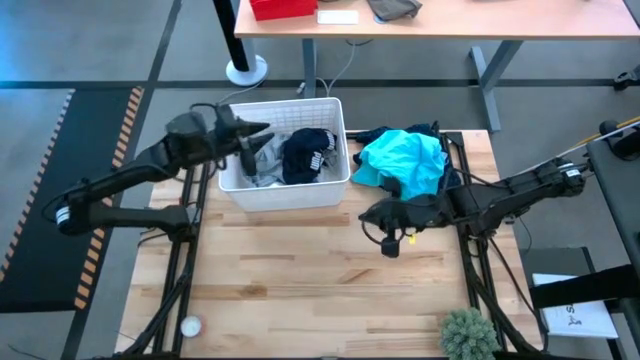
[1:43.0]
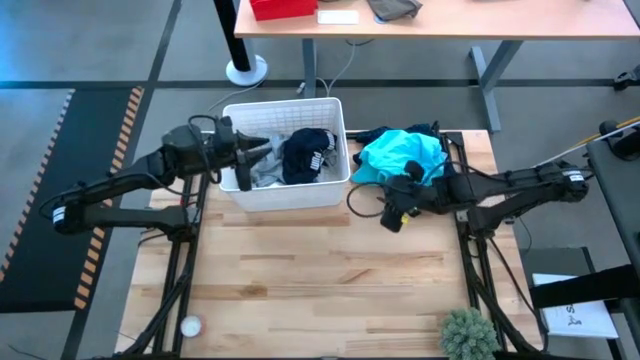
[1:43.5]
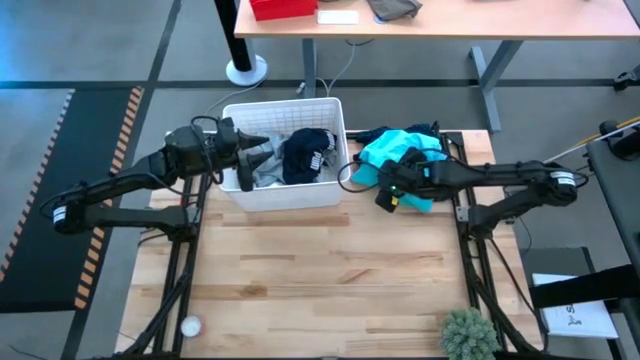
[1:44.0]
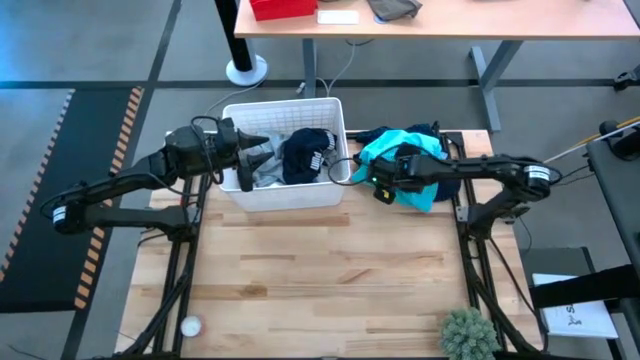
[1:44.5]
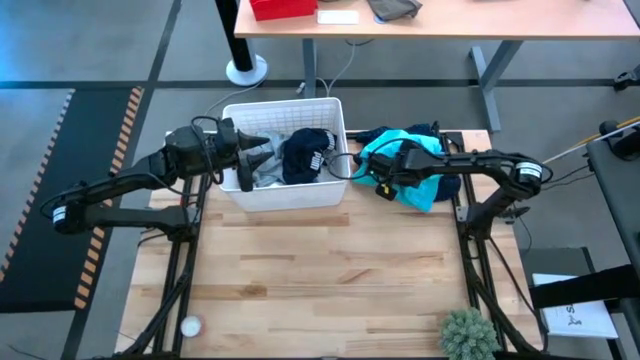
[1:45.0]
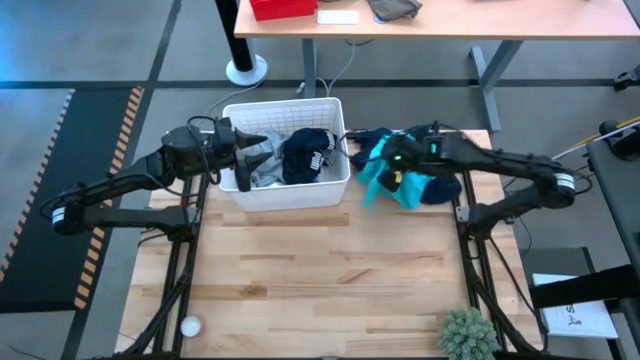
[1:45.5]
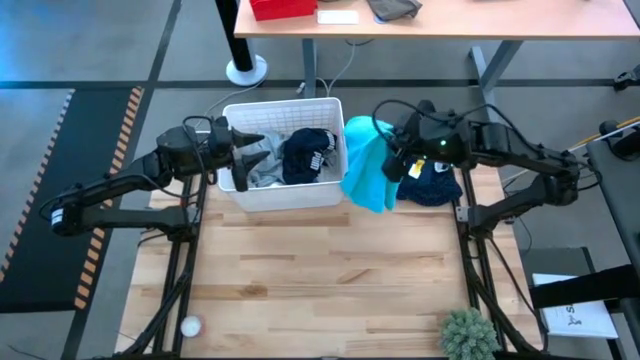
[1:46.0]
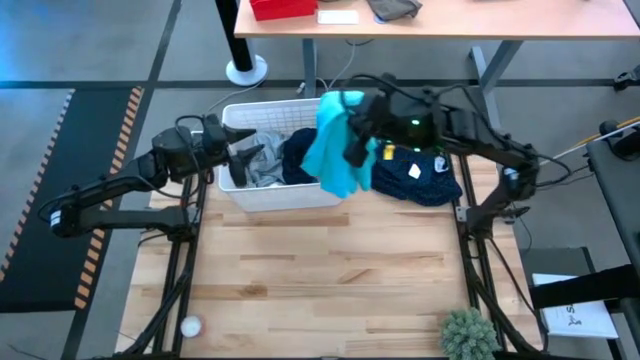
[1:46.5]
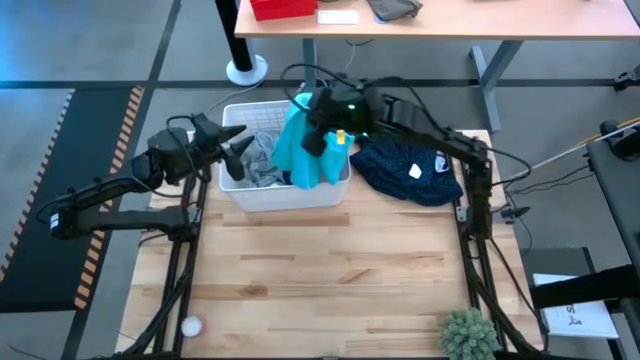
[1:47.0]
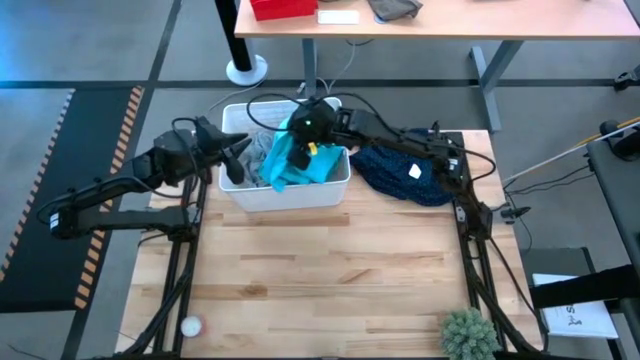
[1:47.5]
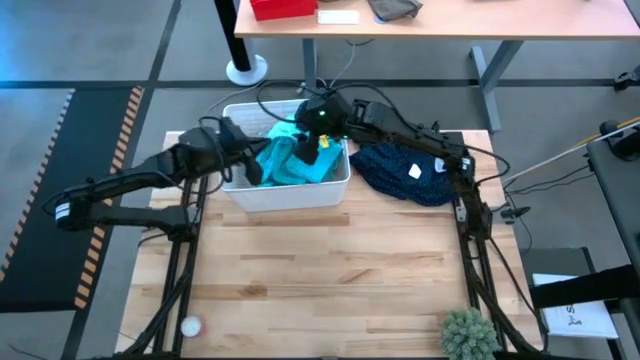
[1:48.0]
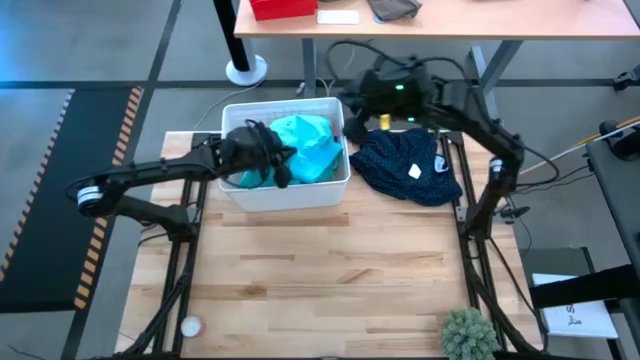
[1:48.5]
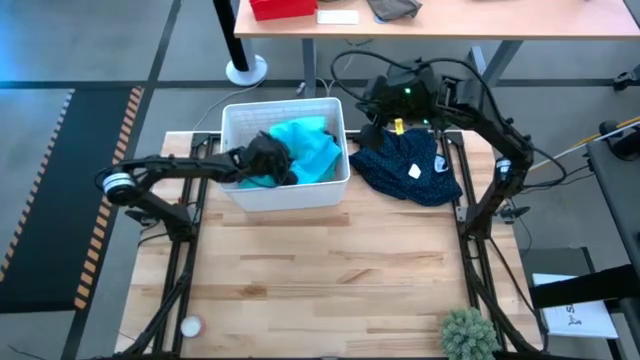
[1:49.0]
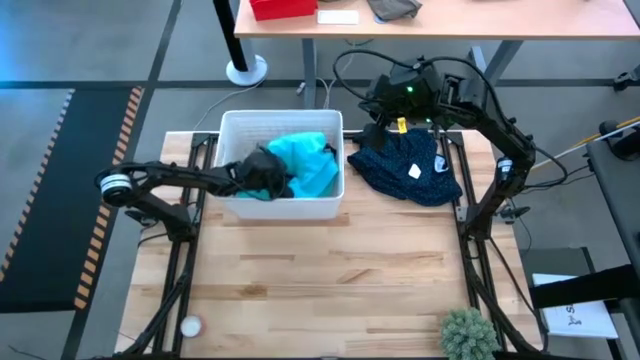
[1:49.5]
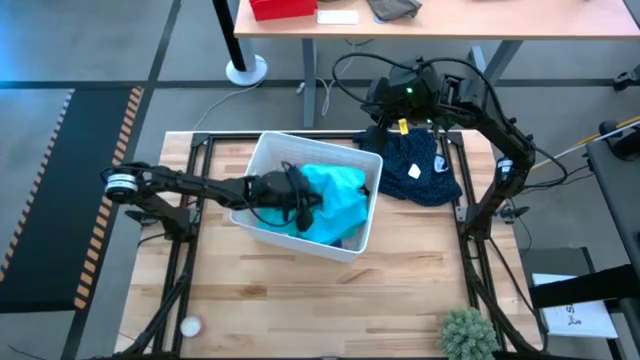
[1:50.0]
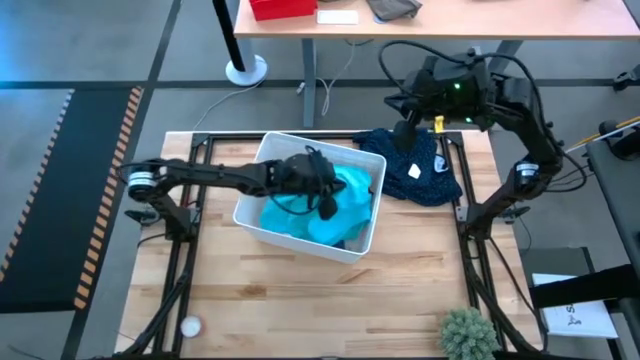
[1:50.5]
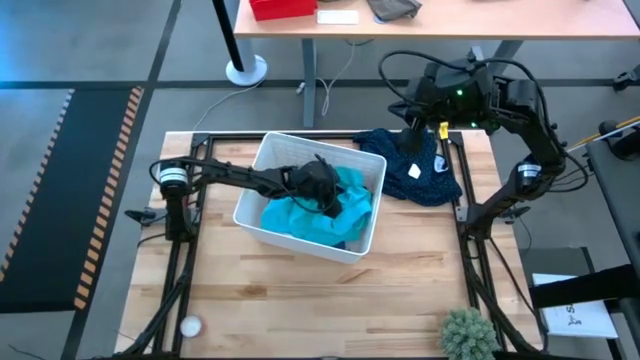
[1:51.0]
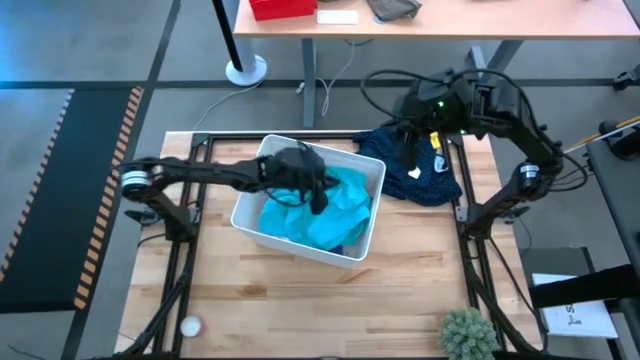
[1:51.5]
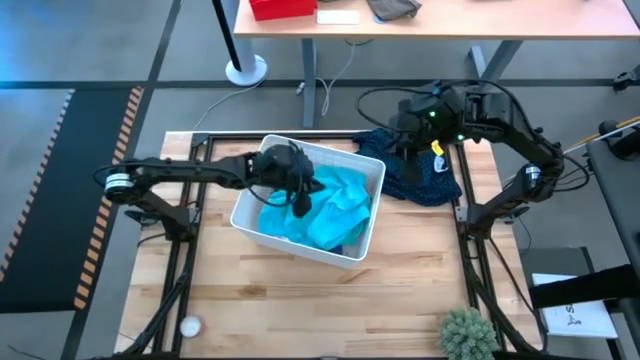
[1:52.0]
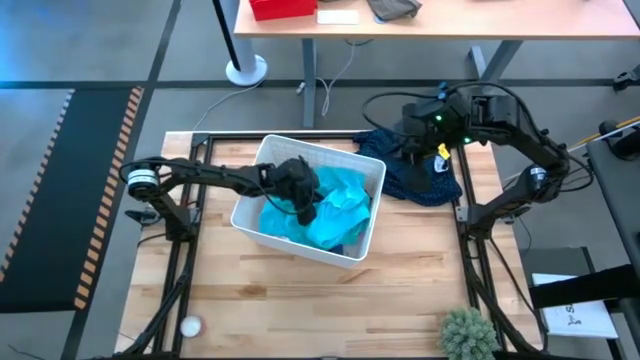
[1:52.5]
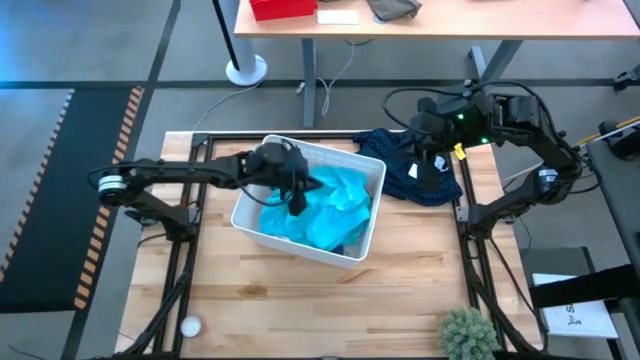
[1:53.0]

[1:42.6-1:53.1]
Task: Sort clothes
Put the light blue shorts into the white bin

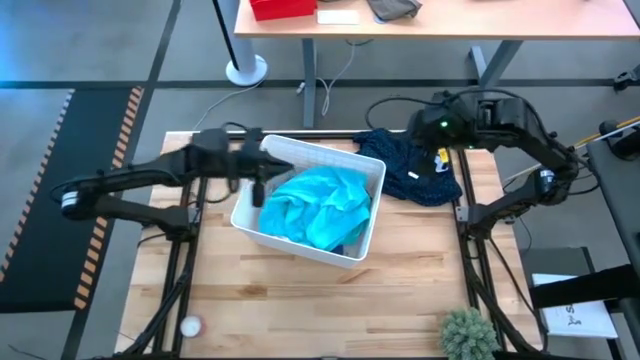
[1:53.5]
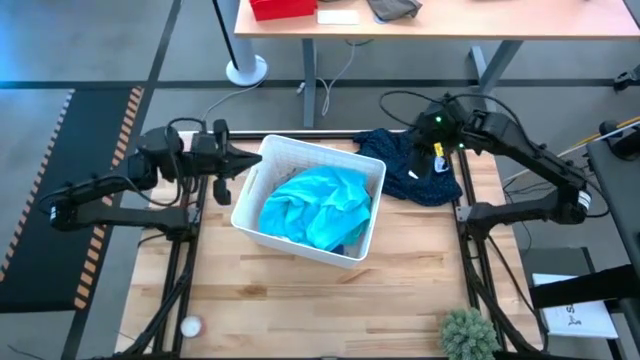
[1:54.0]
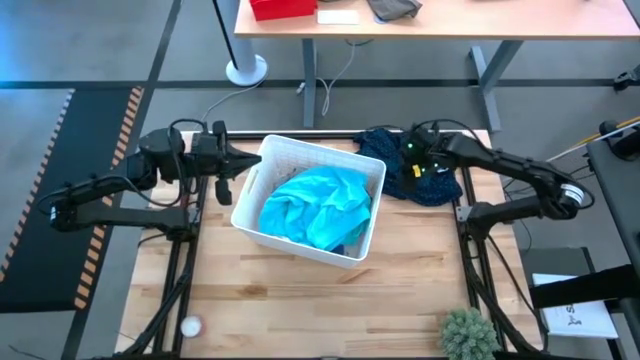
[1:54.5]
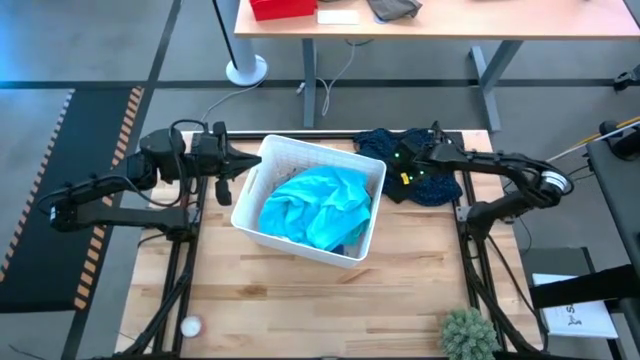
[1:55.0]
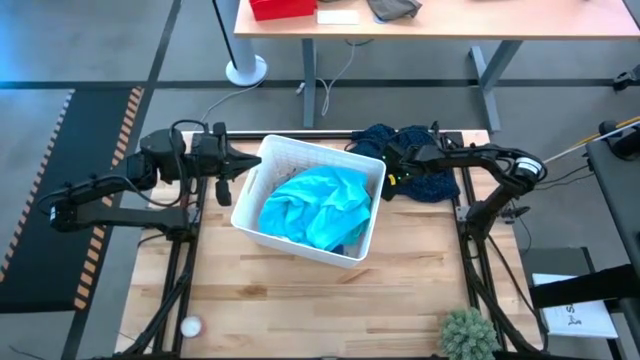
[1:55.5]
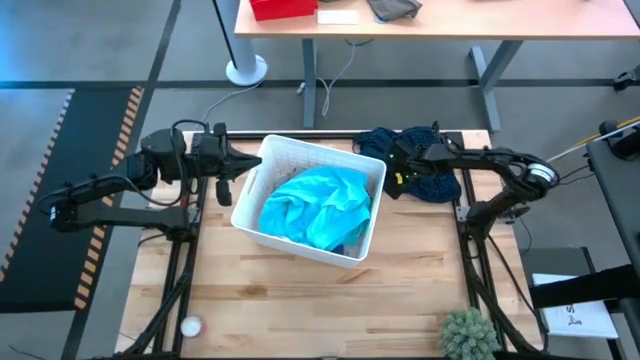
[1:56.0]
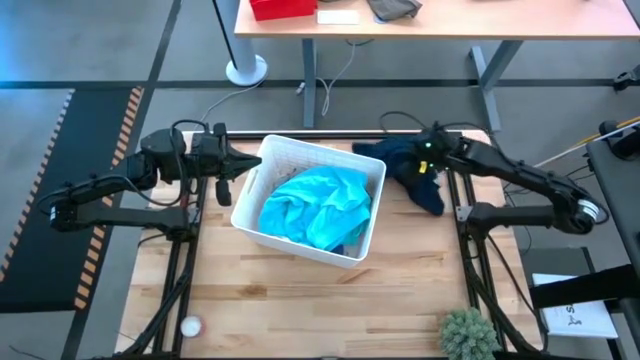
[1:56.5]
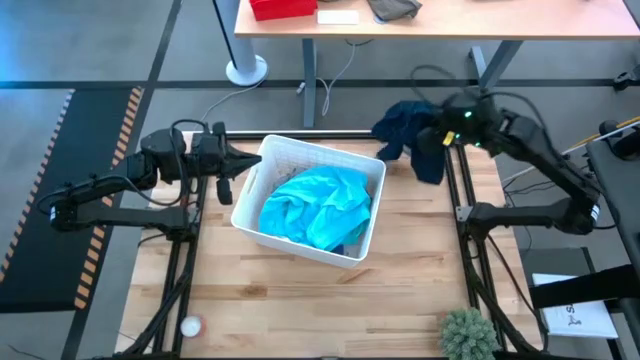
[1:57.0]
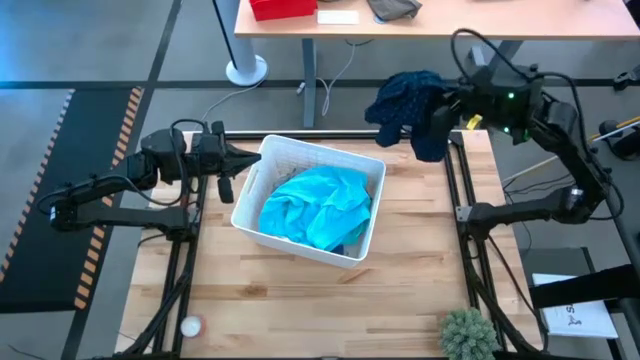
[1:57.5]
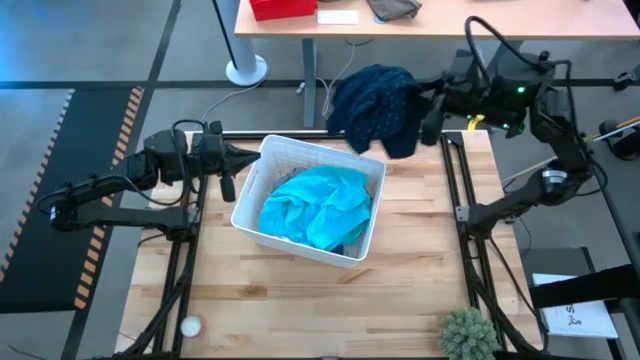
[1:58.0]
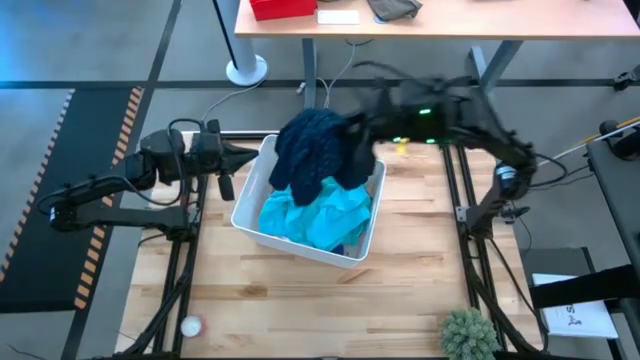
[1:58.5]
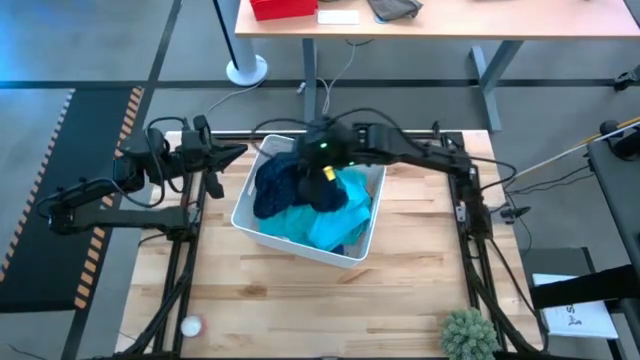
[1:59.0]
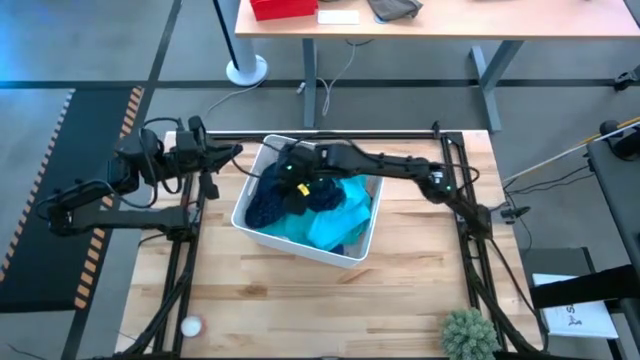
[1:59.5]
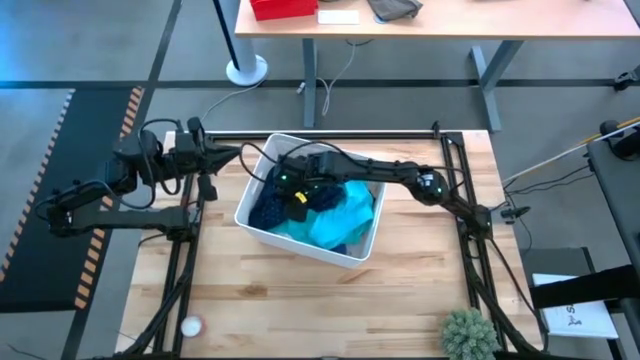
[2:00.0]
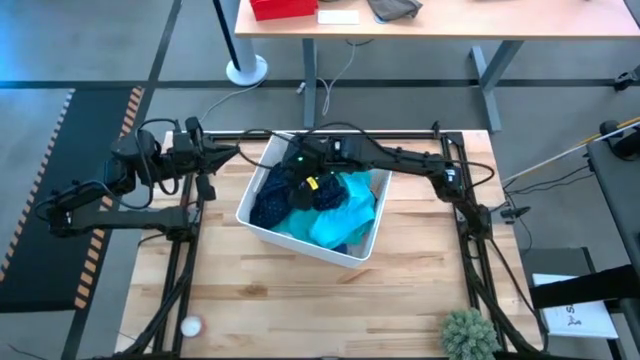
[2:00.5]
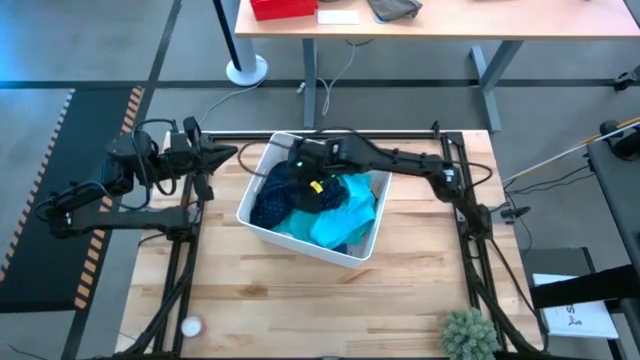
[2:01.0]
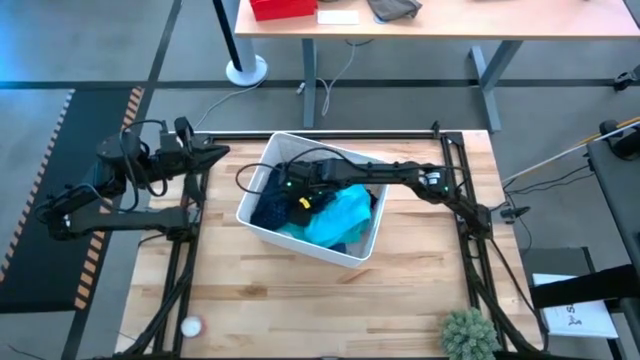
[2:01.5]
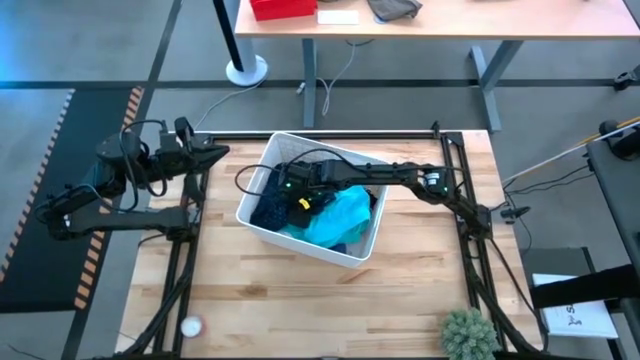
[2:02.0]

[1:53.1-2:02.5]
Put the dark blue shirt into the white bin

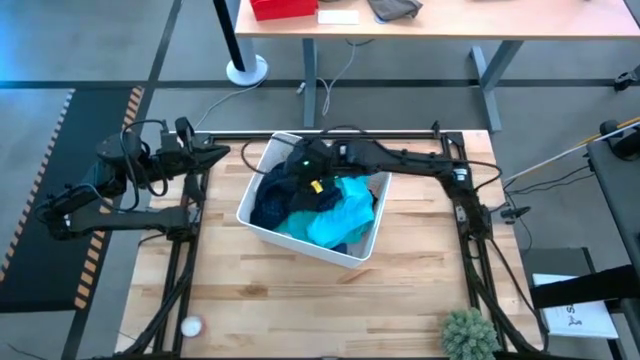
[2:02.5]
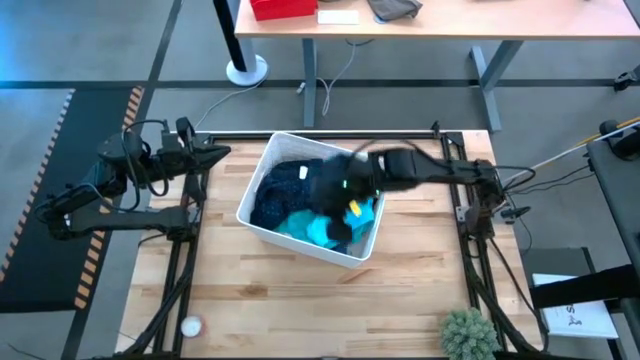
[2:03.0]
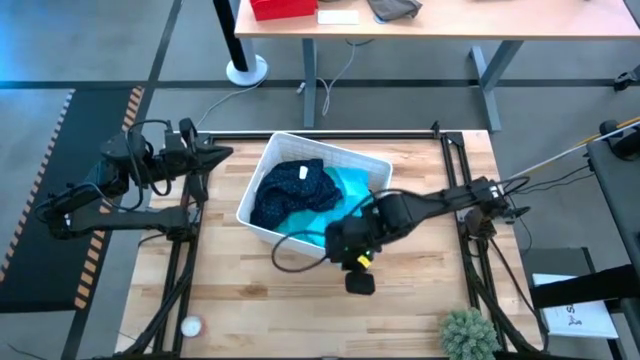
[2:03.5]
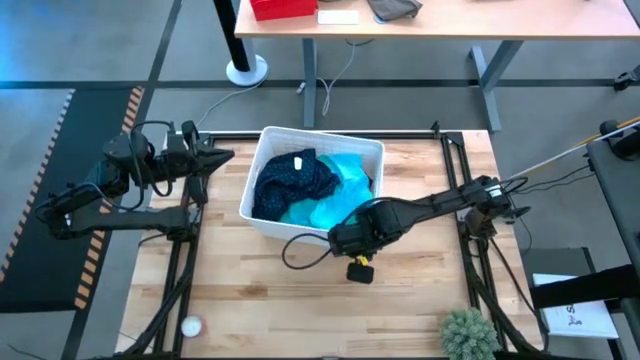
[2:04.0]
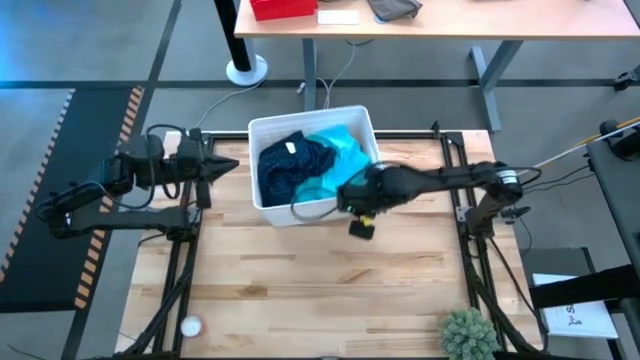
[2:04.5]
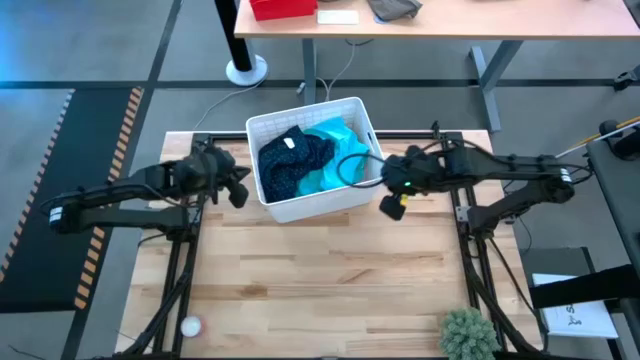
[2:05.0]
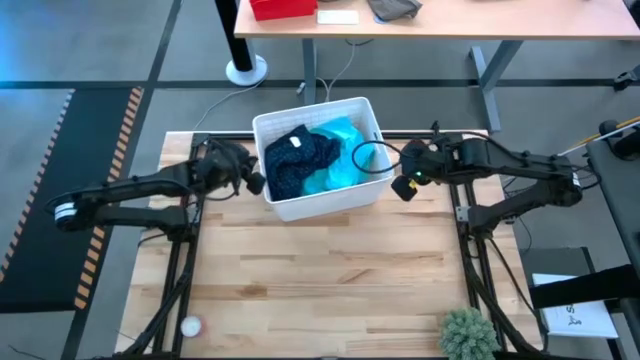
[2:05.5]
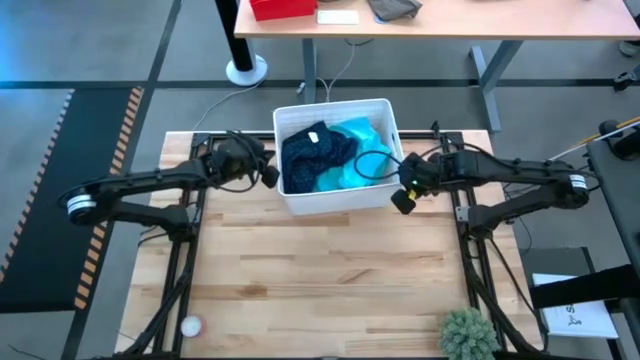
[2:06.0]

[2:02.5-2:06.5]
Move the white bin to the top center of the table
